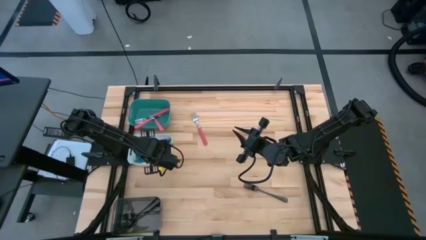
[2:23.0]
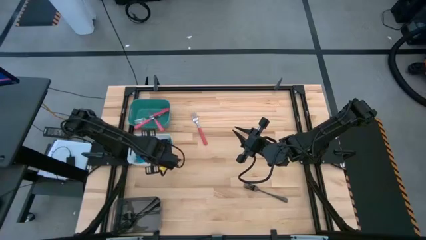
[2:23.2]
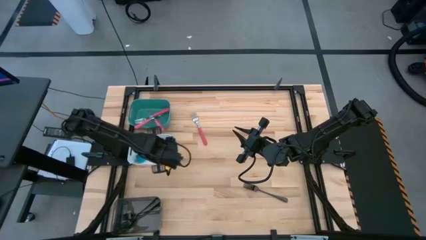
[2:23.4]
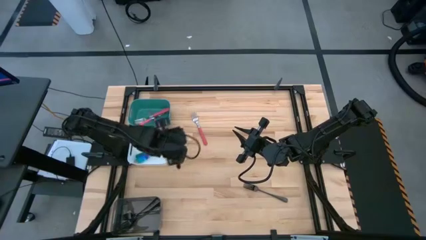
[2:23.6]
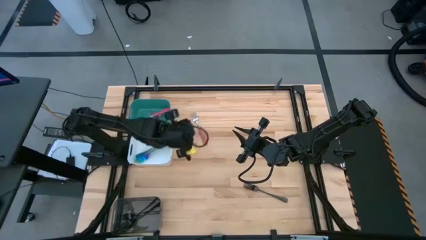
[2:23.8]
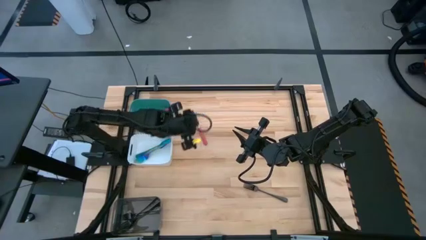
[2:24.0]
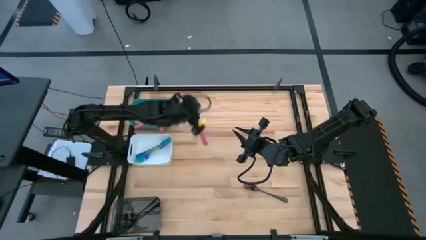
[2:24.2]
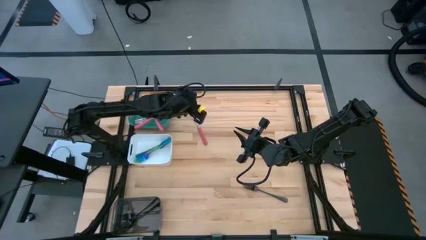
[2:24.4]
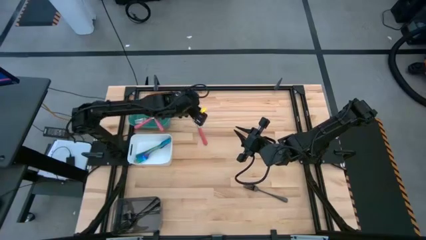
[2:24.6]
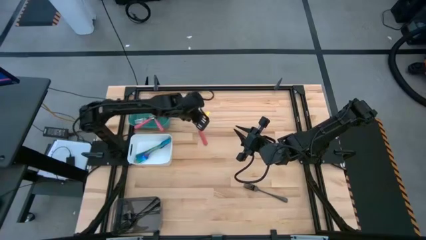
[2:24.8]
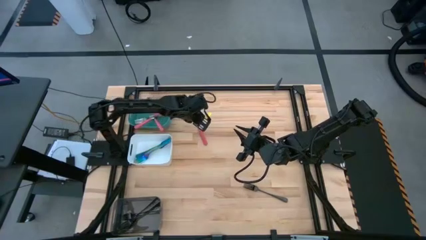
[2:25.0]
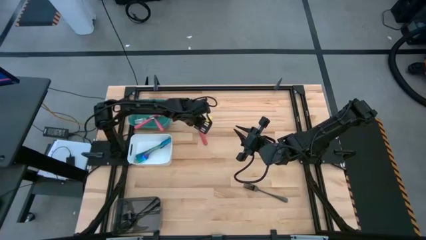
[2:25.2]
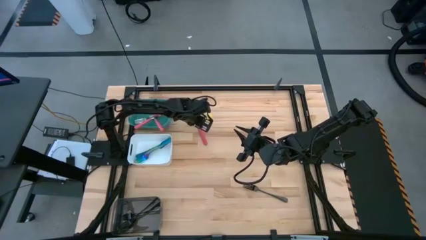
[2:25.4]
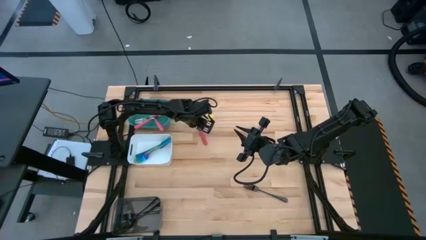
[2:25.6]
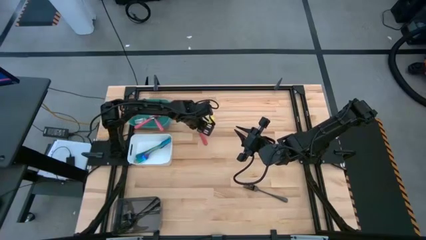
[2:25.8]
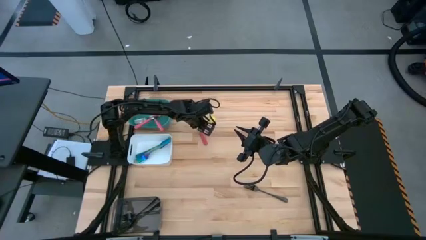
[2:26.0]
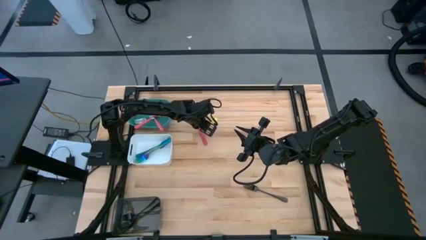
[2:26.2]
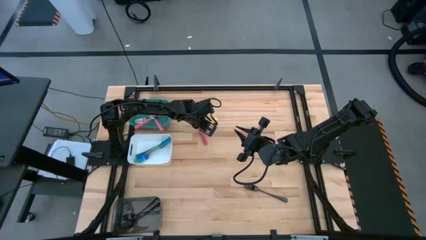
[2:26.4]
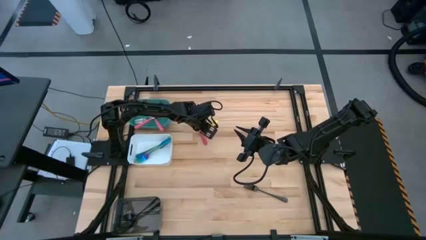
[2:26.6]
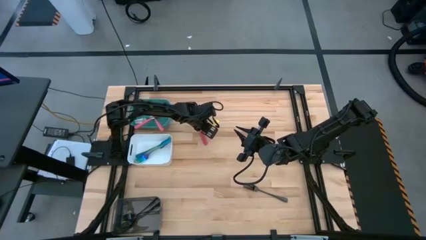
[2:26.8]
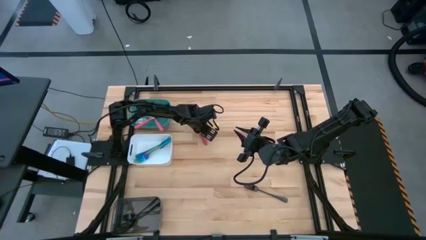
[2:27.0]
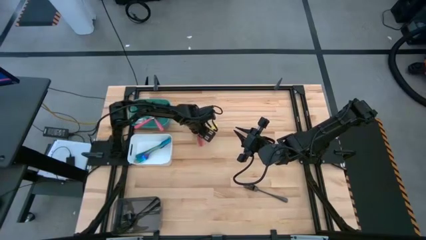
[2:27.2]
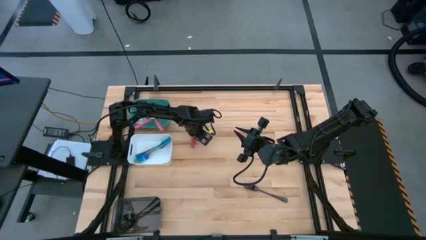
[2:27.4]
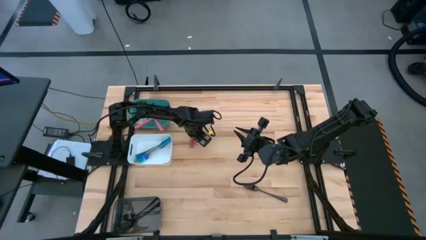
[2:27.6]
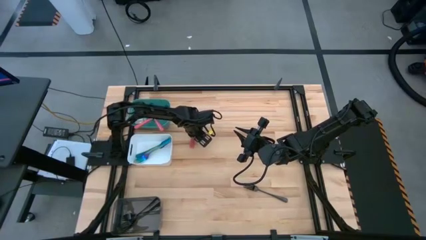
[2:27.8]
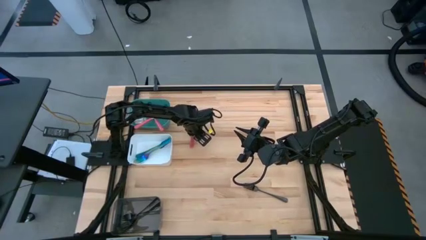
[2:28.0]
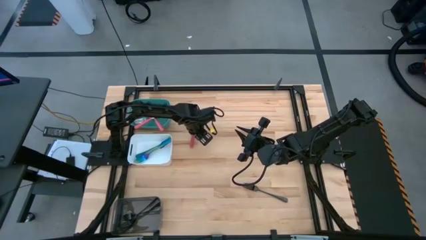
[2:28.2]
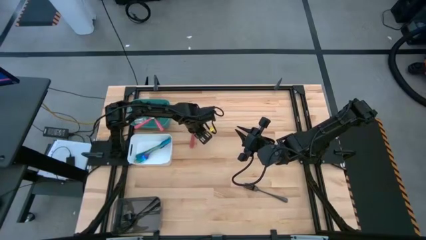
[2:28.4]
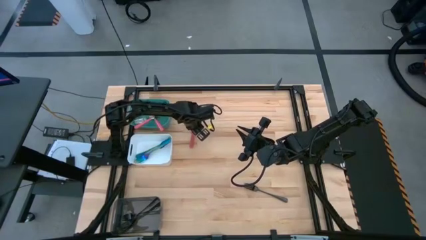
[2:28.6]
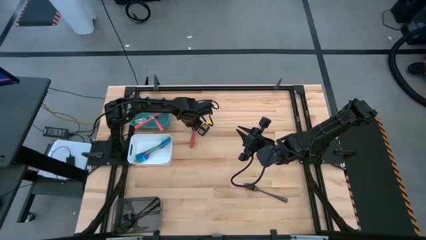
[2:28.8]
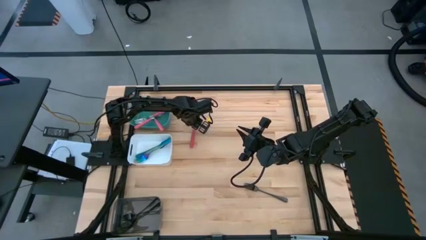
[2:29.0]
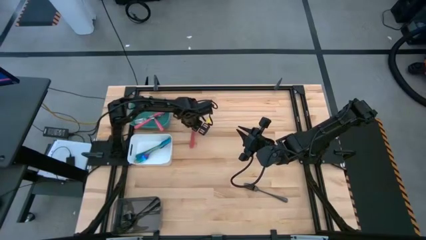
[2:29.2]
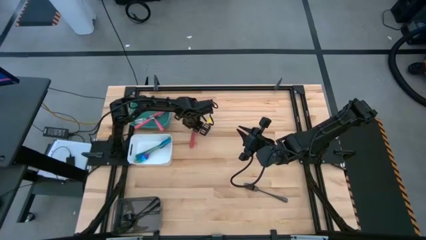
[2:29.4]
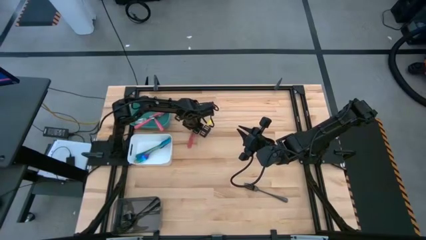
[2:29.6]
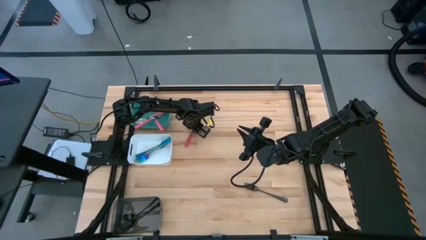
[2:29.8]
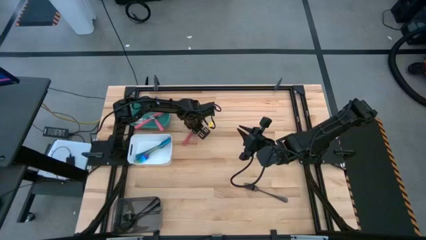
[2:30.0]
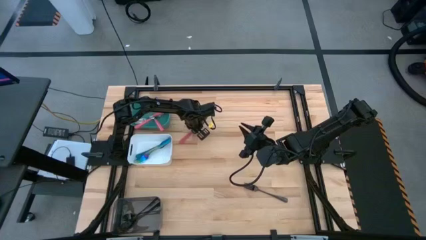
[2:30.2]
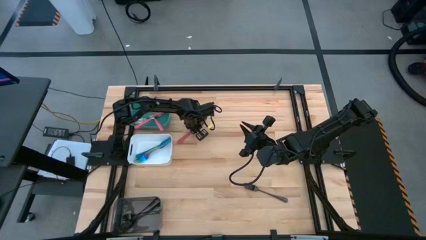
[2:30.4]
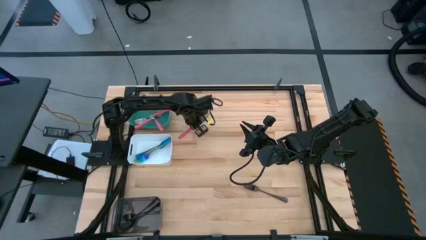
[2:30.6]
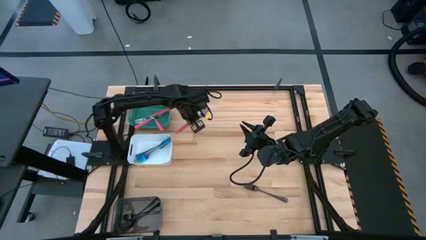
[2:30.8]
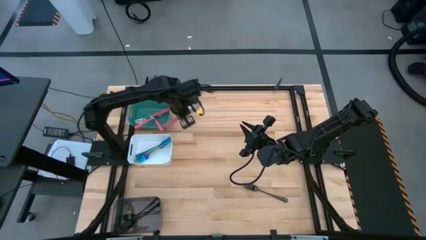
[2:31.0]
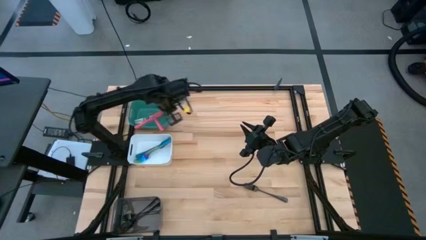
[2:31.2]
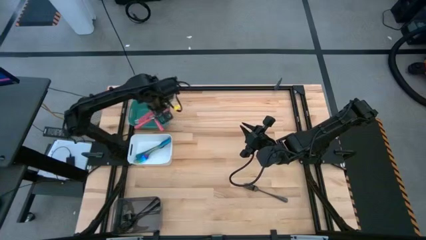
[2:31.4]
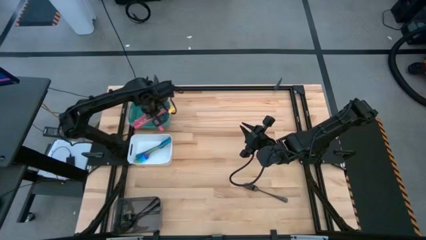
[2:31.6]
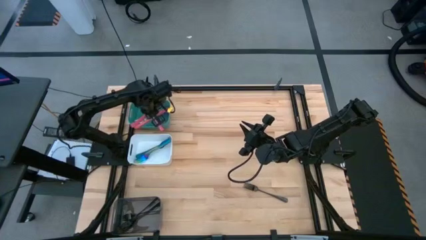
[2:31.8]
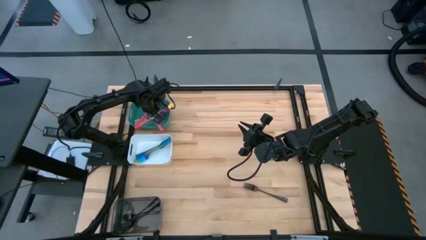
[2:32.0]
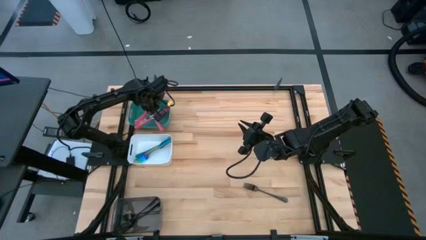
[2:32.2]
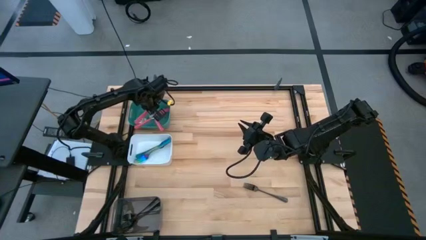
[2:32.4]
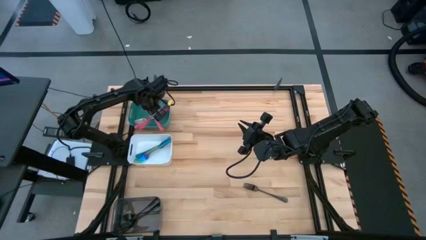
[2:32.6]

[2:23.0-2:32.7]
Task: Sort silverware by color (type)
Put the pink fork into the green bin

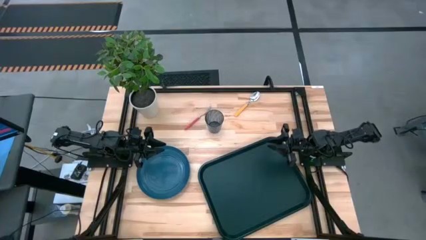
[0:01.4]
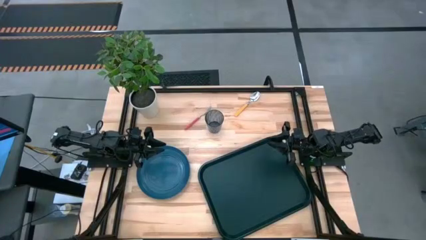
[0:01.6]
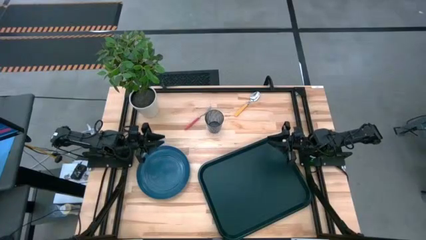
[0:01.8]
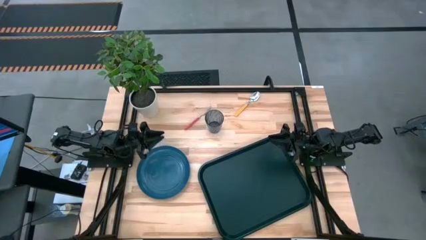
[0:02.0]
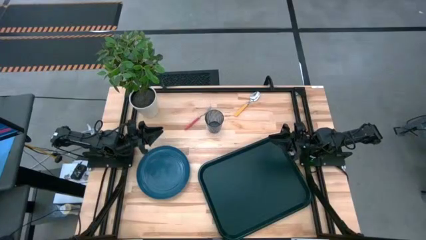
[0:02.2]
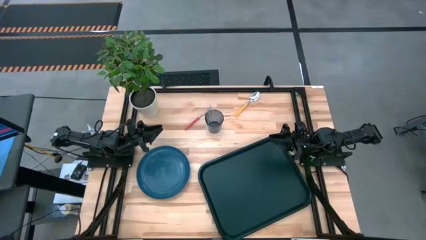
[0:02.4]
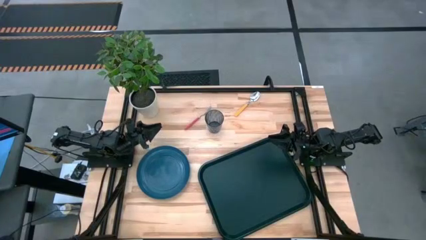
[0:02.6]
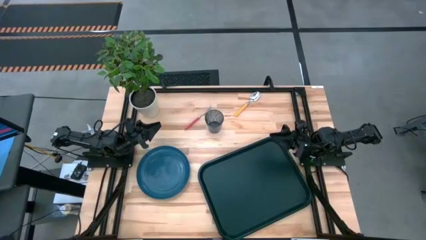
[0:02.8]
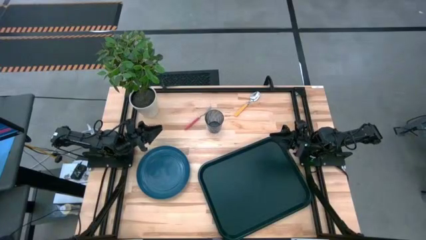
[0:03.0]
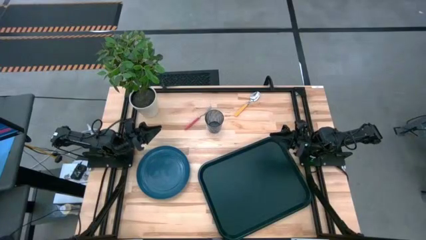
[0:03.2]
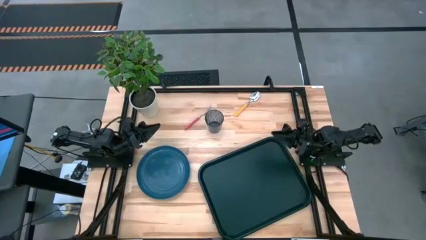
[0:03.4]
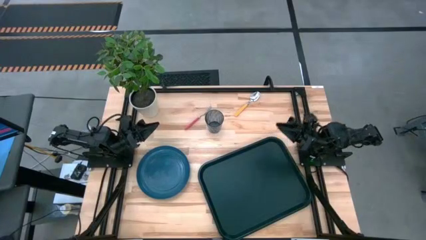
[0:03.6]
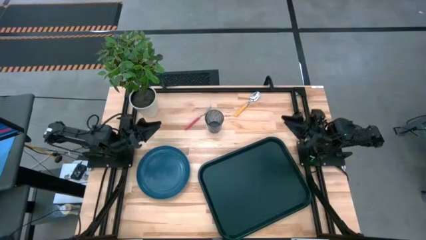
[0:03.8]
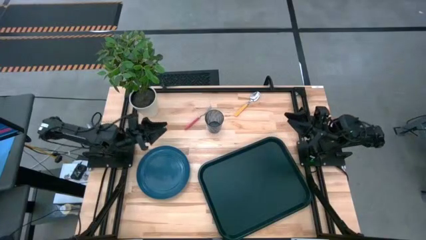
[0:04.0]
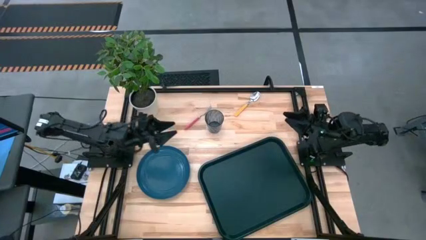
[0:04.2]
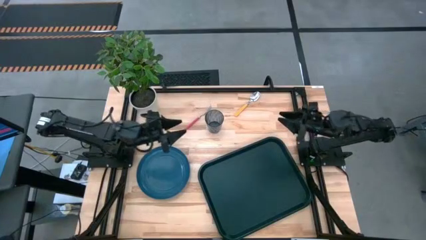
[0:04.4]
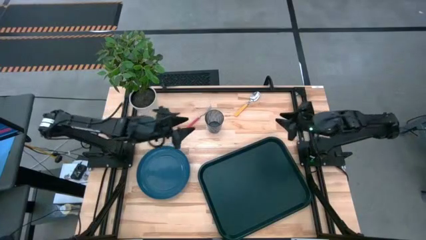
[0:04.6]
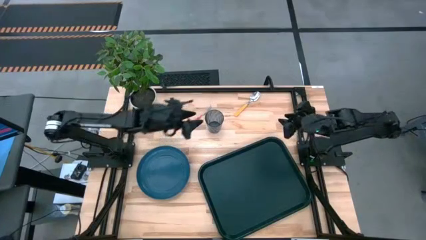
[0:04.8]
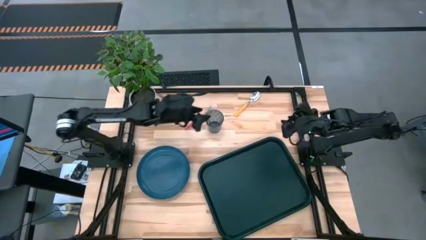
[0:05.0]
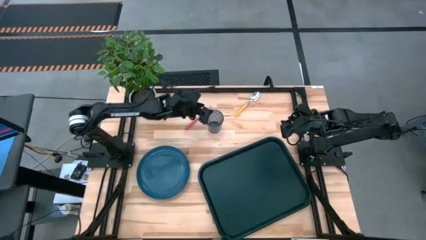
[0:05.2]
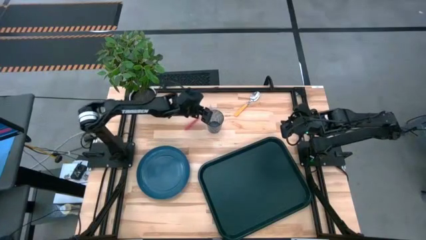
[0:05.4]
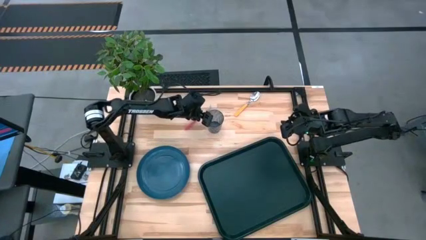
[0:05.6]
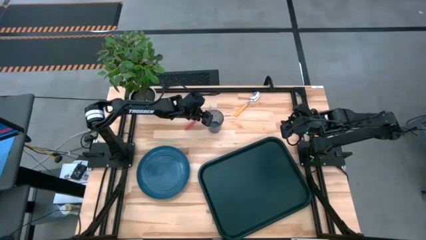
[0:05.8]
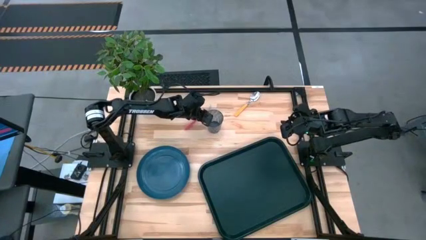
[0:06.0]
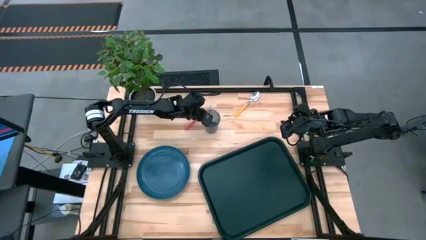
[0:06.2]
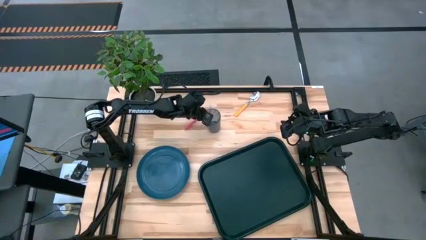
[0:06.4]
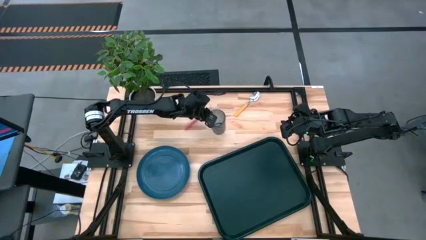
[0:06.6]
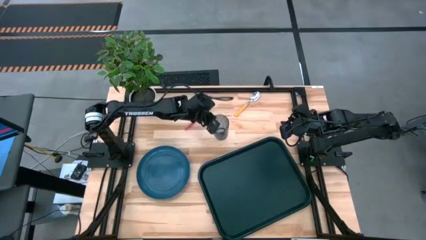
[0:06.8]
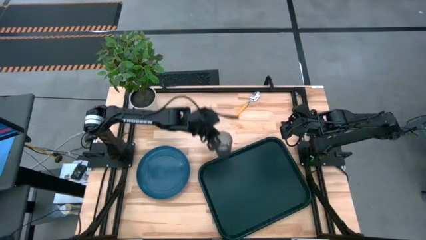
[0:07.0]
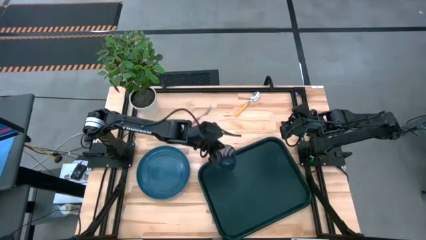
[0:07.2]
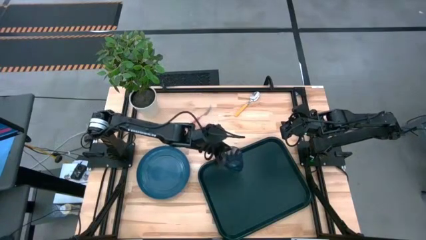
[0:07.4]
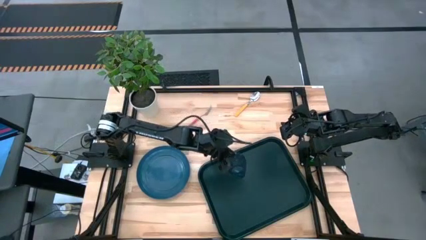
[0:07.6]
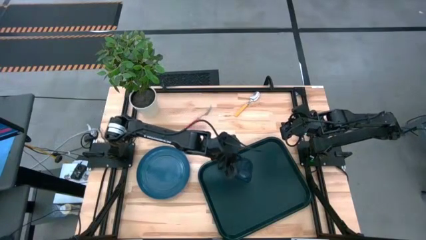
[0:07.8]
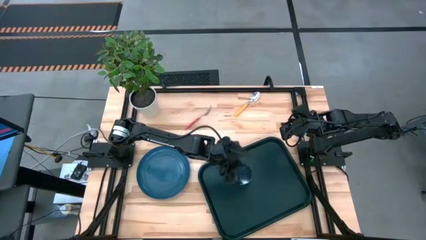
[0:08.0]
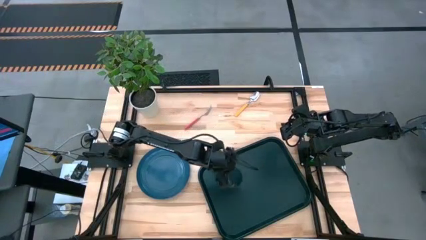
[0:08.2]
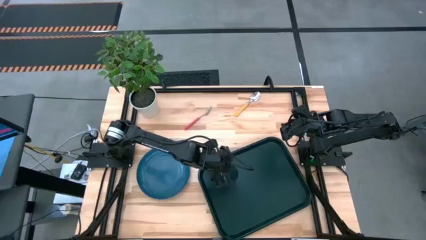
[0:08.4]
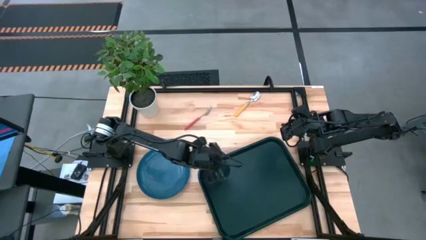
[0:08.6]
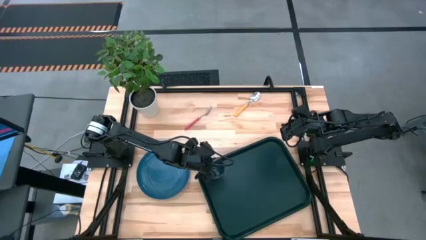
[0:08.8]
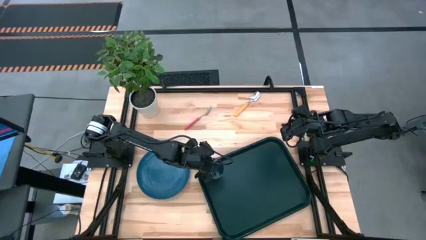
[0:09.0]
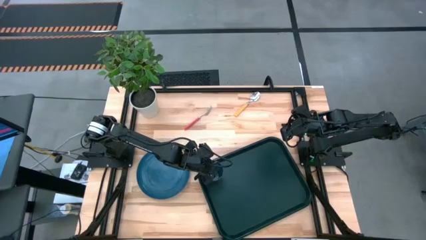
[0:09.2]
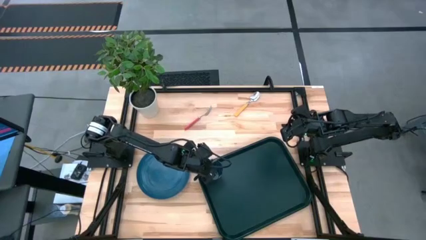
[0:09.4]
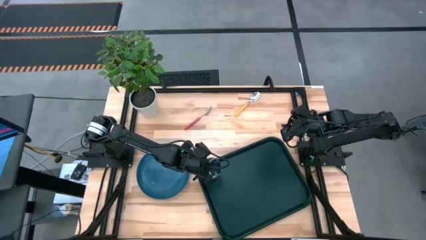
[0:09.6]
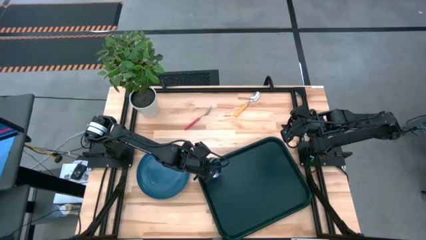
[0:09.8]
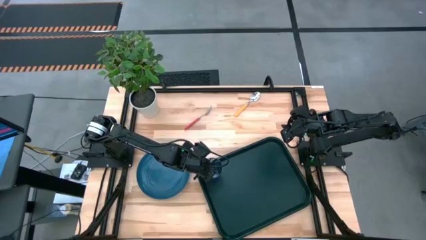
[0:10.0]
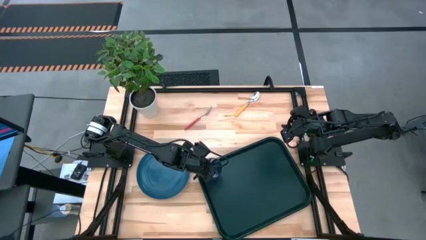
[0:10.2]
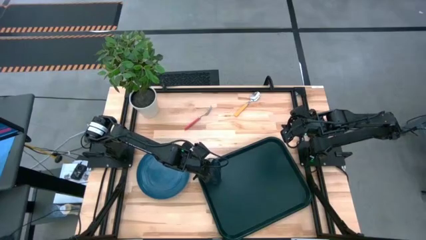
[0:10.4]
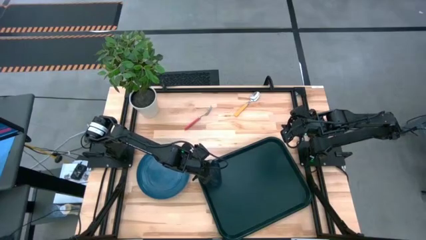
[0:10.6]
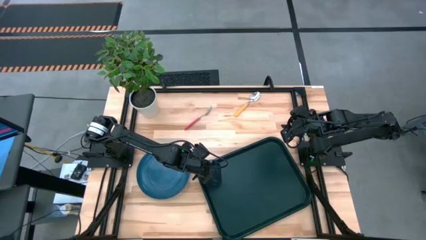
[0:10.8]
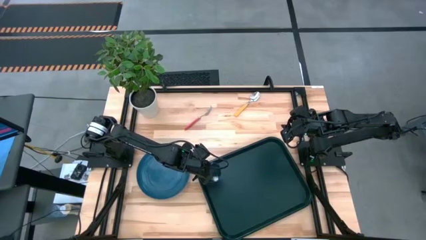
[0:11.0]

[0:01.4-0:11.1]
Task: Pick and place plate/cup/fork/spoon on tray
Put the blue cup on the black tray
